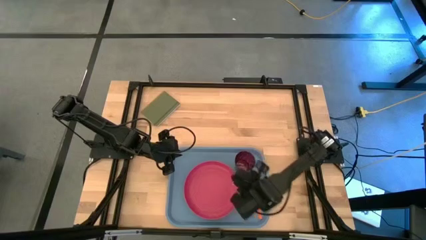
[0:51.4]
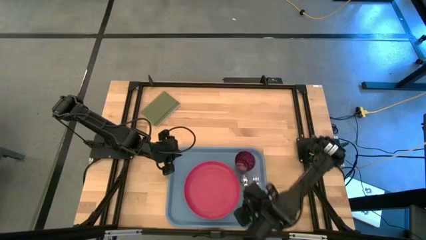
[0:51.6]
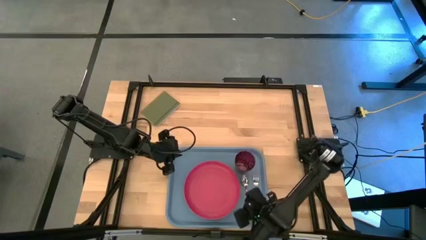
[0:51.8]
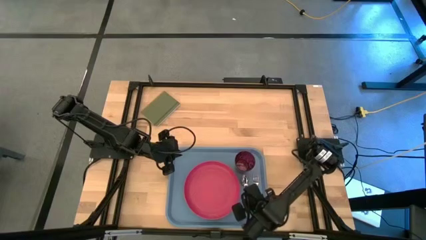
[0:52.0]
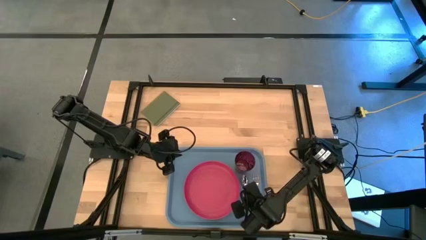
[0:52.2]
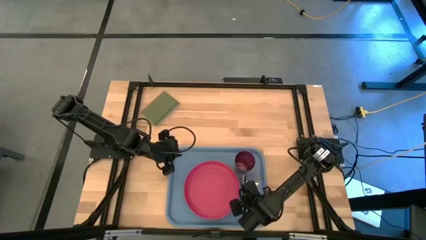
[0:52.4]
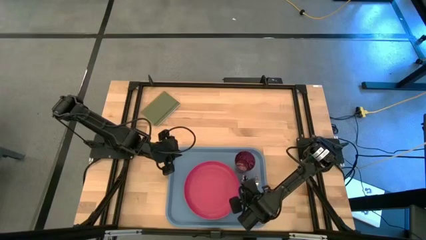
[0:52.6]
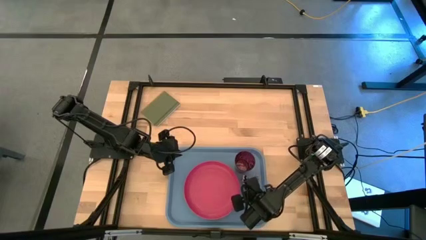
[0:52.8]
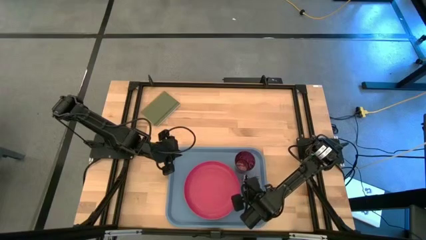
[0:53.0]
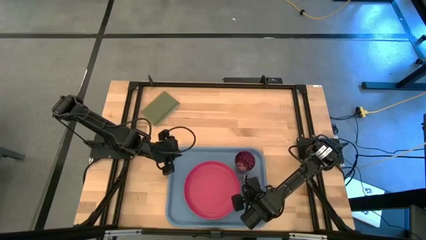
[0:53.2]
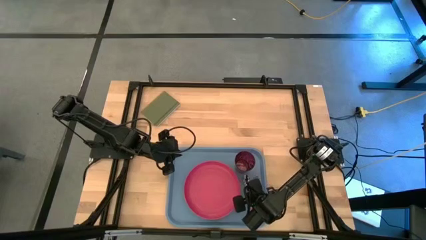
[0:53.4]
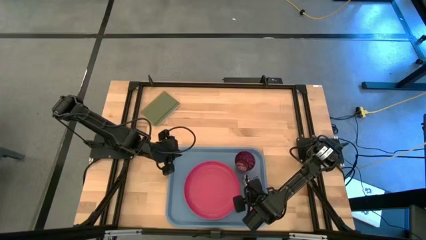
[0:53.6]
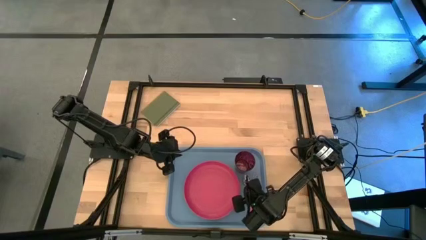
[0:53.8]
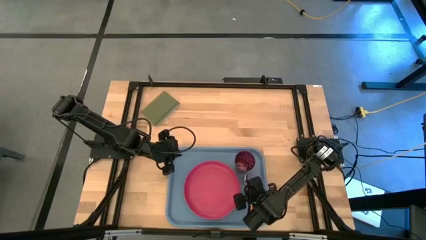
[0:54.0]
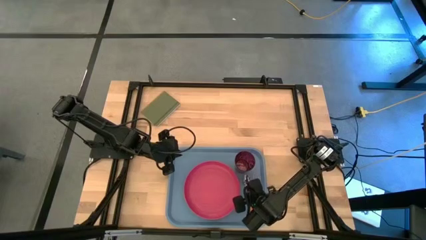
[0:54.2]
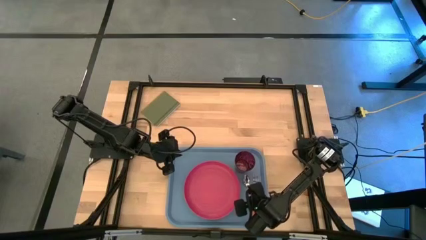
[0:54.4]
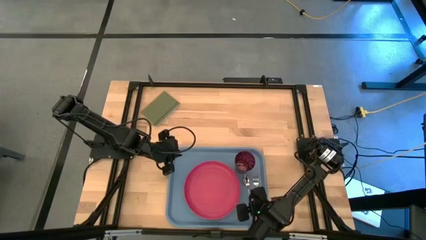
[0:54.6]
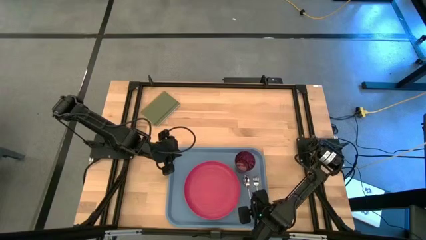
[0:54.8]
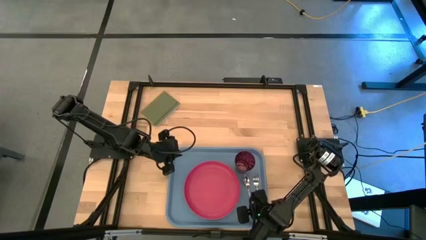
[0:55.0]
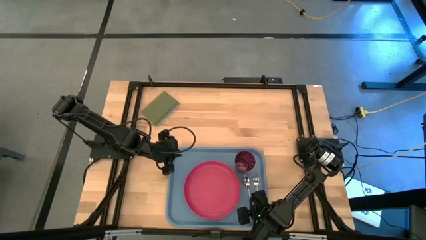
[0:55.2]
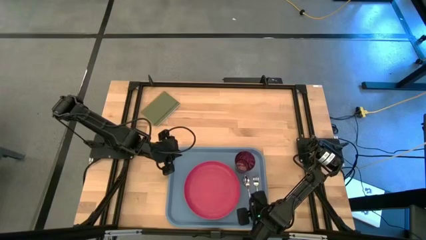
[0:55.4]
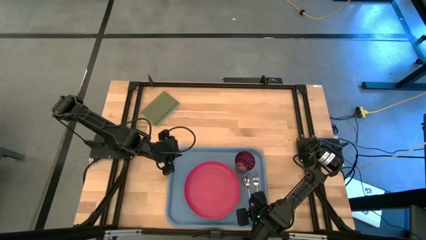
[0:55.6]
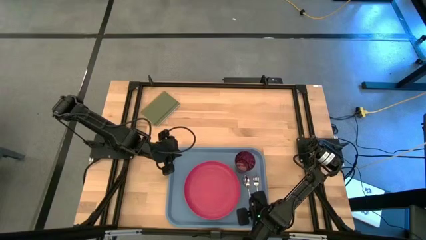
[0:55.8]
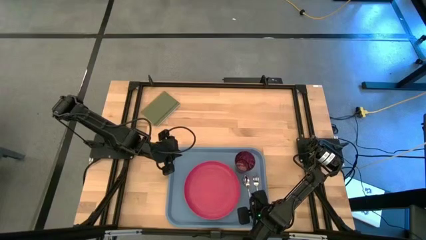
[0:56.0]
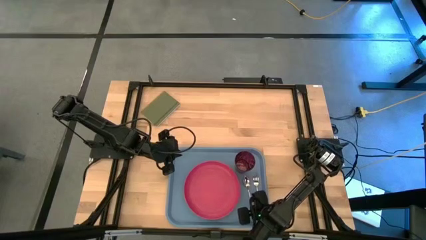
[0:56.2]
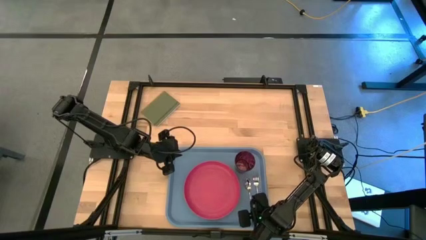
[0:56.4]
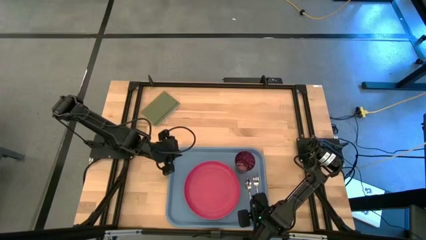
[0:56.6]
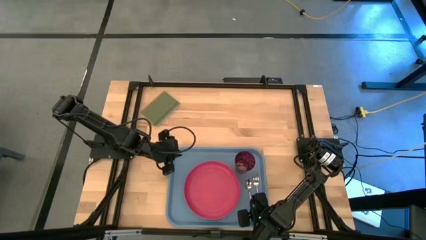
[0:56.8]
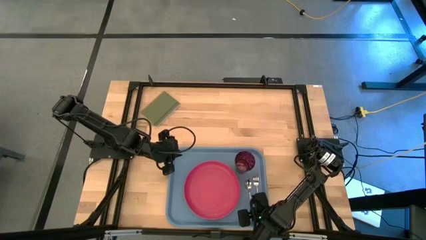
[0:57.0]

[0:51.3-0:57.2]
Task: Pick and place plate/cup/fork/spoon on tray
Adjust the orange spoon on the blue tray

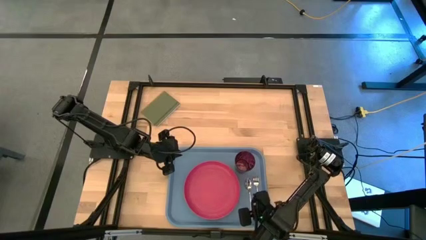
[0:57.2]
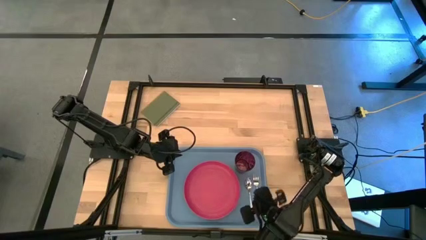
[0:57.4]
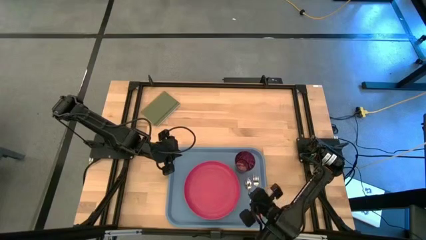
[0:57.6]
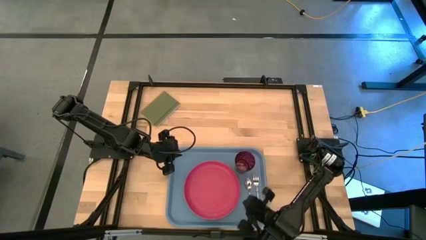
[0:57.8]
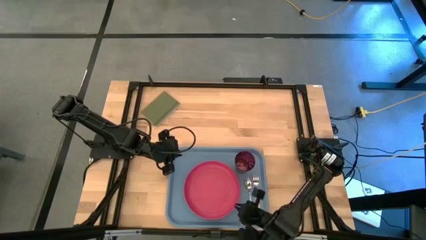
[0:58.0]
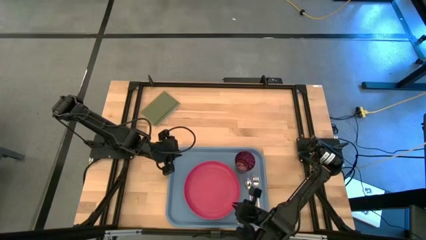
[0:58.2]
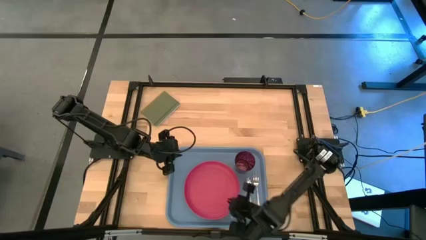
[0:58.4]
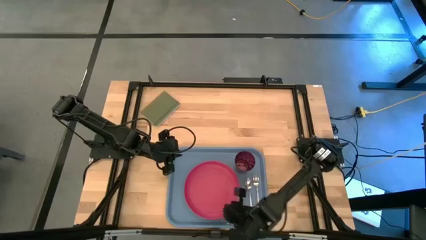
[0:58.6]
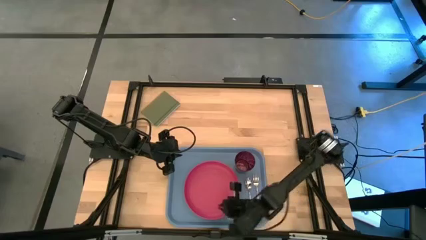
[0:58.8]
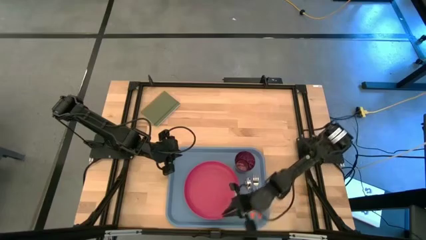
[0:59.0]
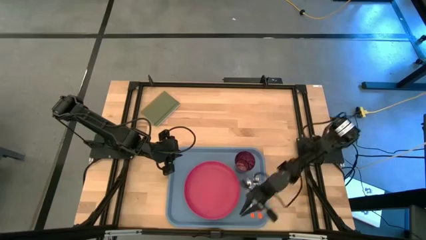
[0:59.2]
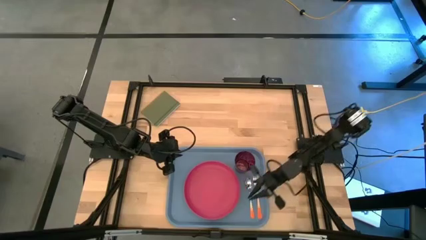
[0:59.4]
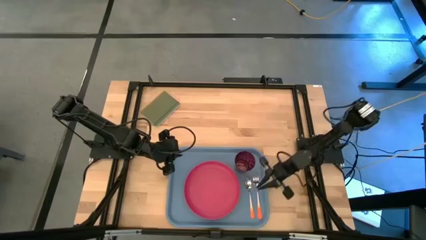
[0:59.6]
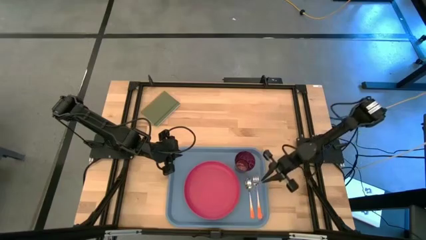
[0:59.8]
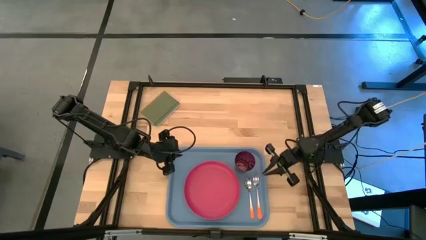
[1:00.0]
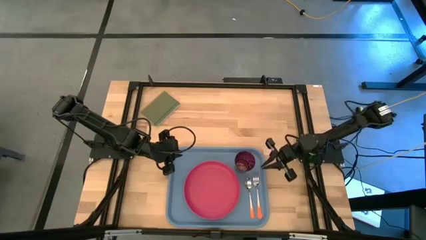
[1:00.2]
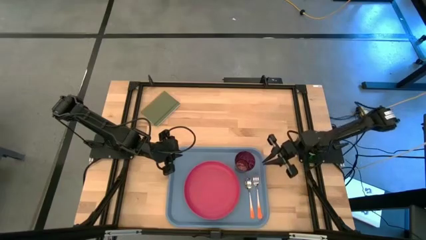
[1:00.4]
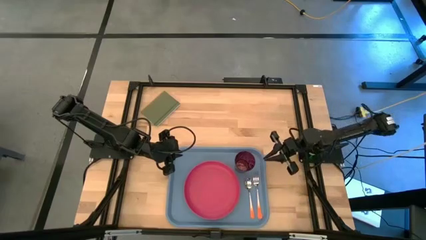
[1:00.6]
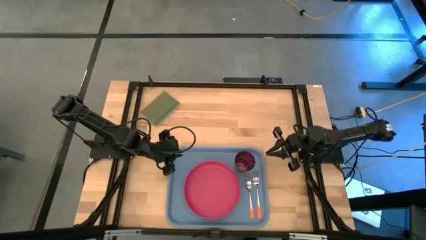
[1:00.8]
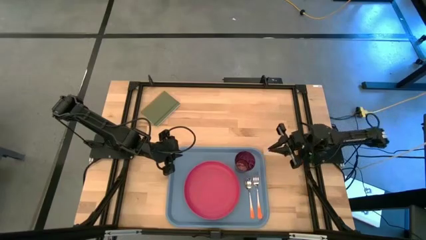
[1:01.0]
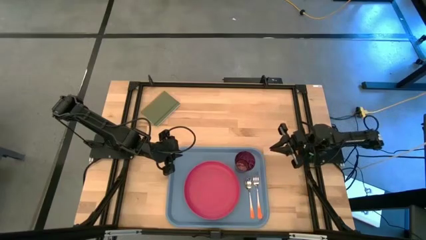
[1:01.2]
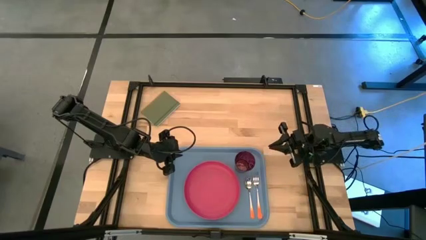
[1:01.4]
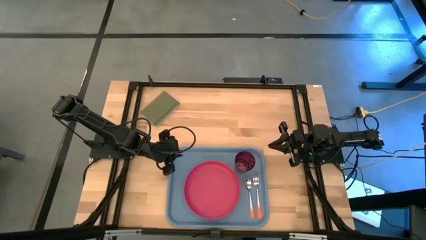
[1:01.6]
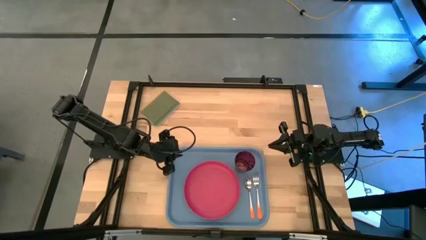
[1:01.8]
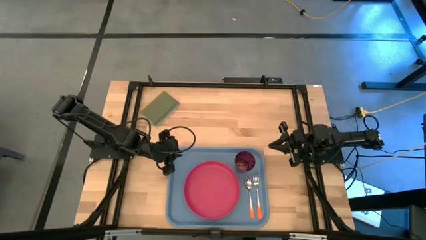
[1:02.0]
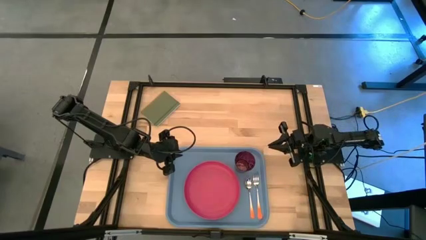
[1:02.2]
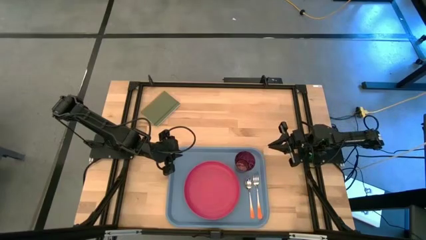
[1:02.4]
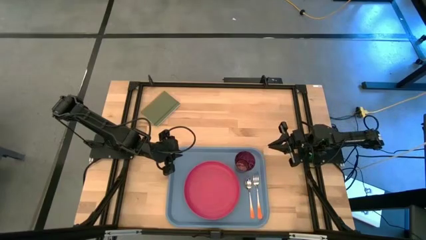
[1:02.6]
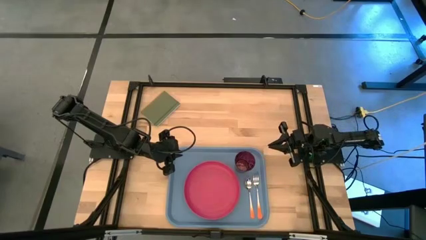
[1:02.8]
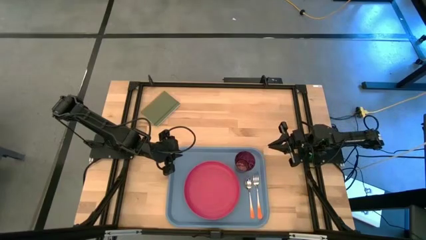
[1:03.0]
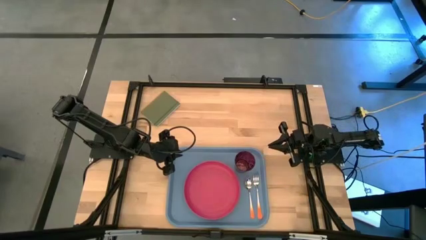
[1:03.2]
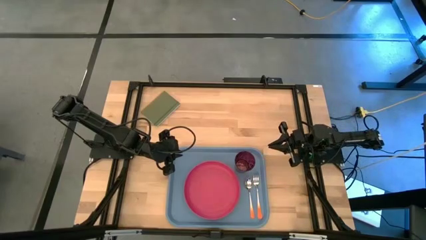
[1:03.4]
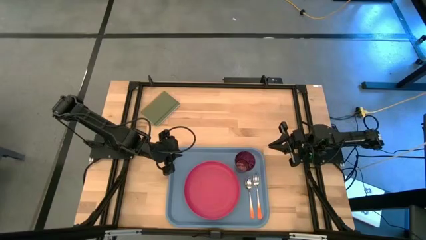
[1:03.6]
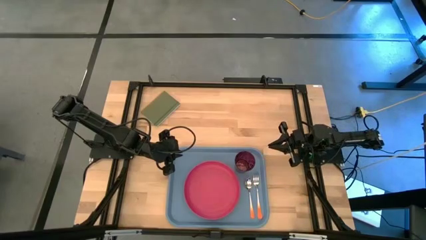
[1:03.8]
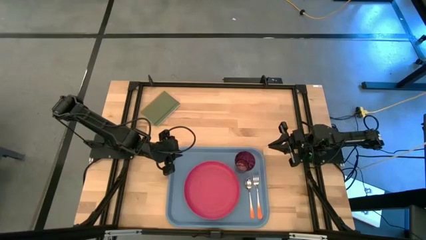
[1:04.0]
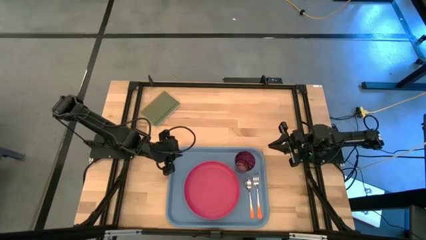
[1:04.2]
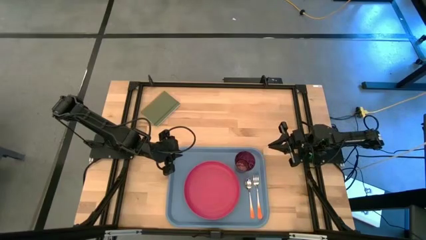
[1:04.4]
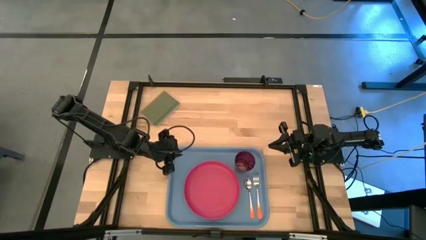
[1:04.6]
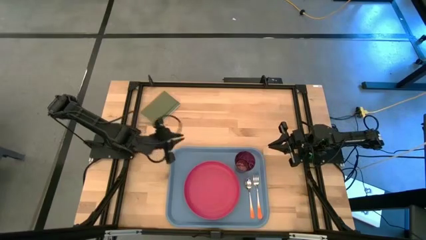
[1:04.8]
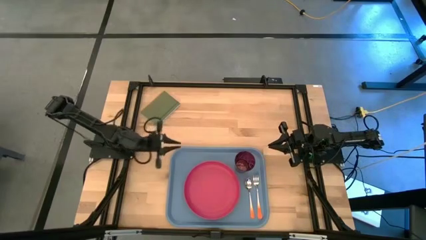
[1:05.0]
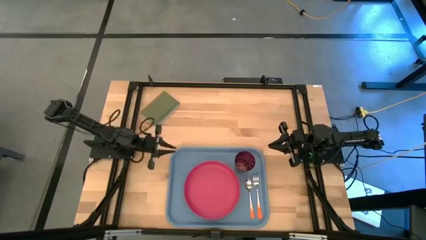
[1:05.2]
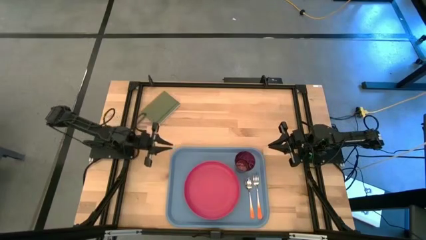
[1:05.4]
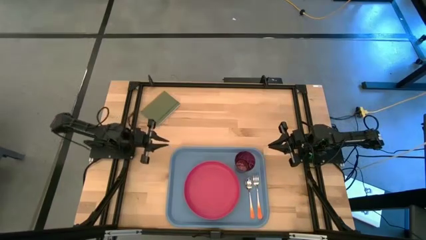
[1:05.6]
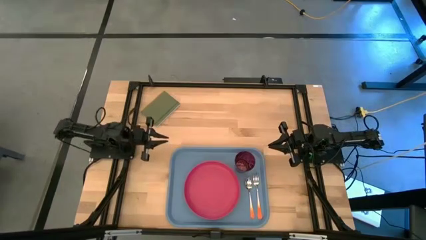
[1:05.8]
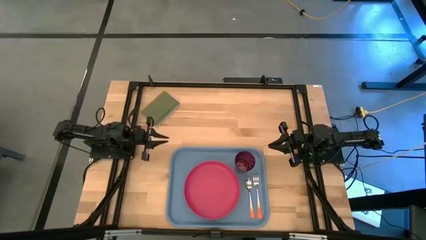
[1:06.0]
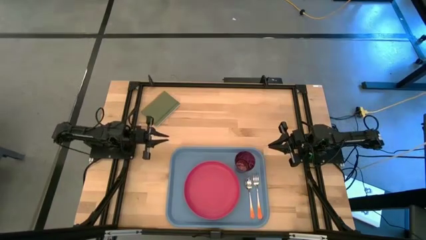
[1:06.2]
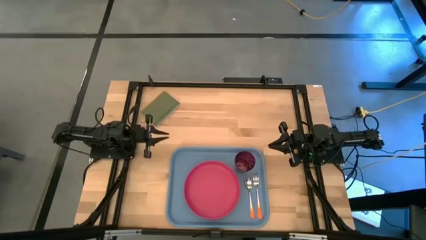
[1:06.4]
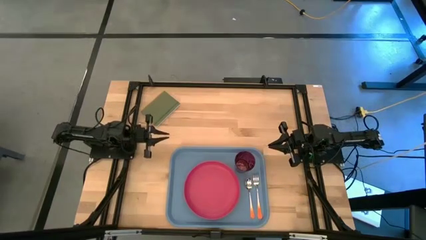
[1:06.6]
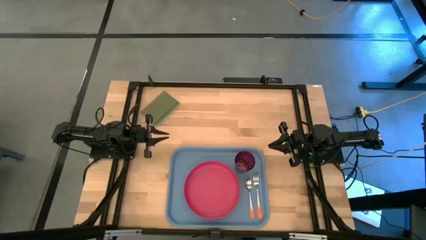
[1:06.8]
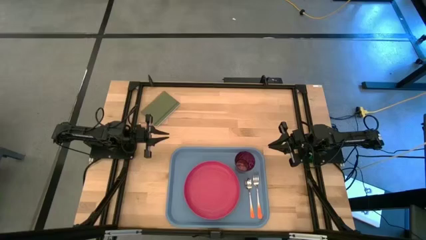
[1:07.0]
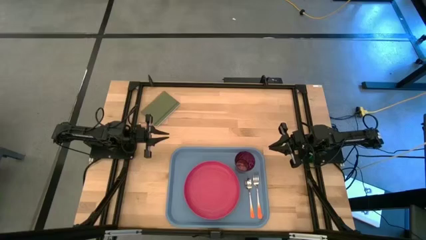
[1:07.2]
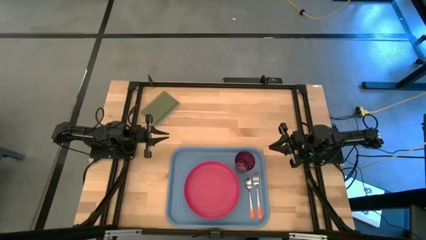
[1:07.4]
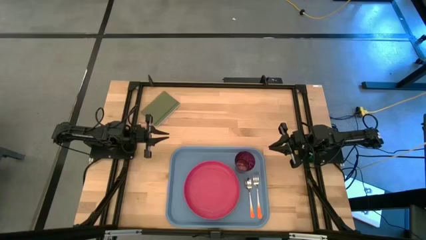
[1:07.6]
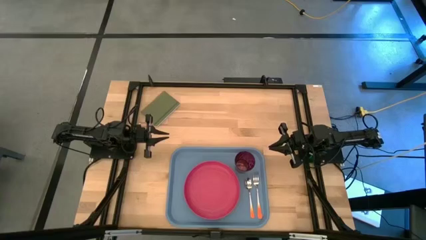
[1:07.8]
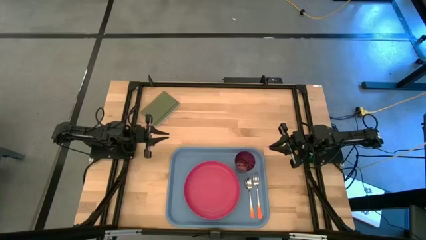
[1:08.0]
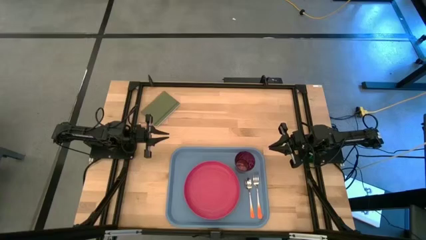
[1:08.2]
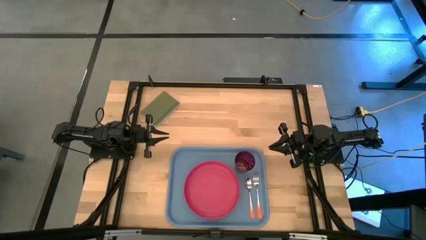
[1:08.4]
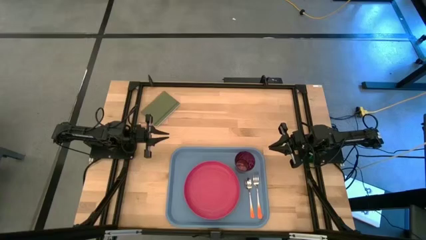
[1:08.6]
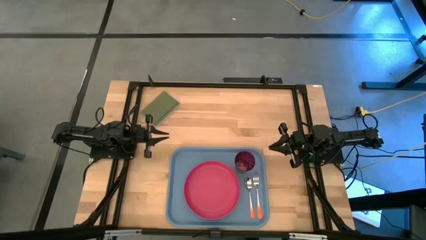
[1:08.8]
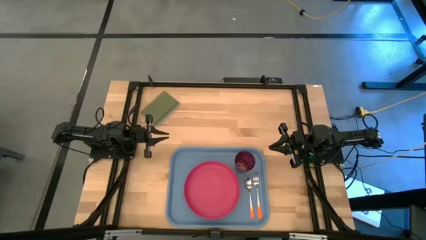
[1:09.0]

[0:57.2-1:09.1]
Return to Home Position
